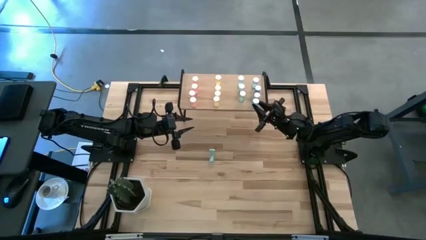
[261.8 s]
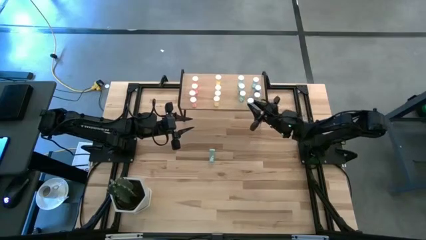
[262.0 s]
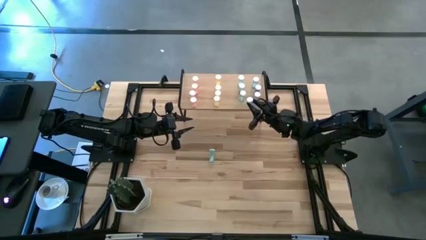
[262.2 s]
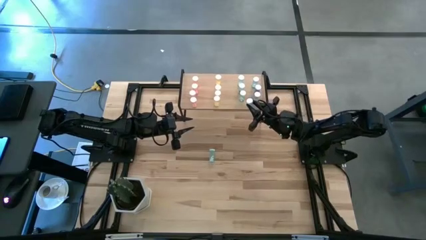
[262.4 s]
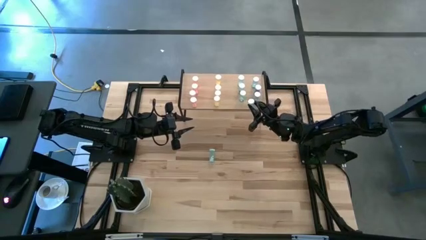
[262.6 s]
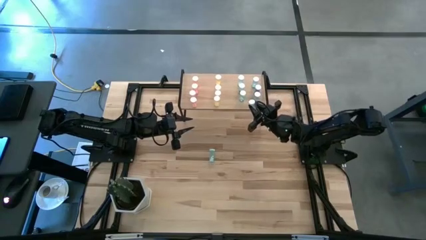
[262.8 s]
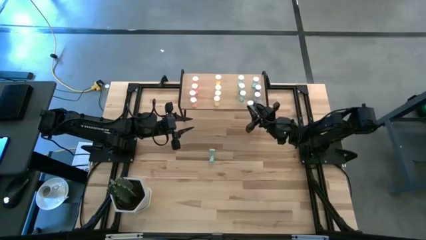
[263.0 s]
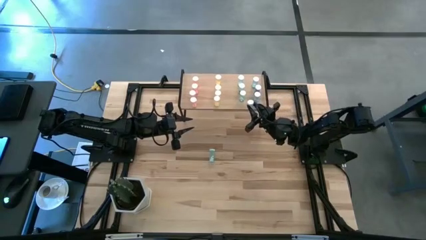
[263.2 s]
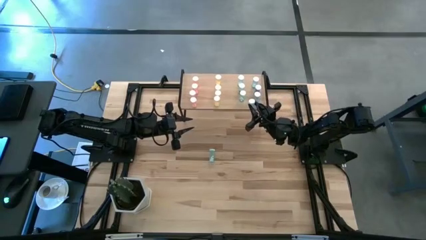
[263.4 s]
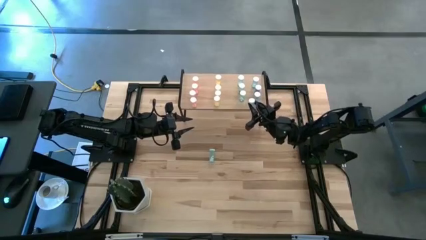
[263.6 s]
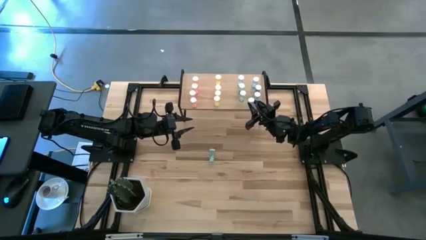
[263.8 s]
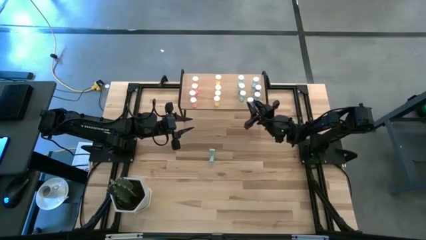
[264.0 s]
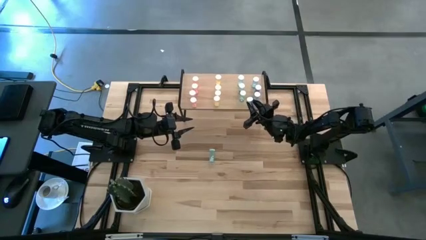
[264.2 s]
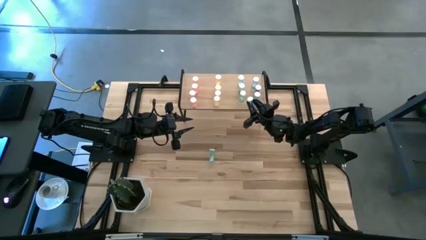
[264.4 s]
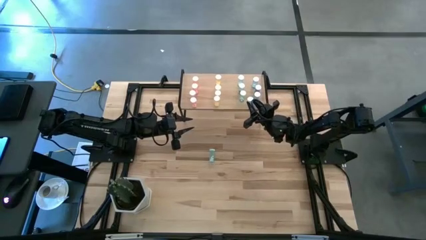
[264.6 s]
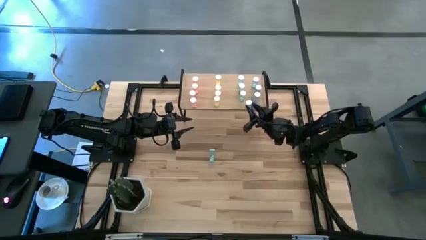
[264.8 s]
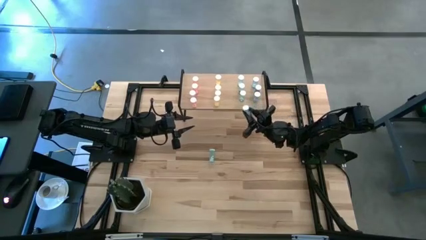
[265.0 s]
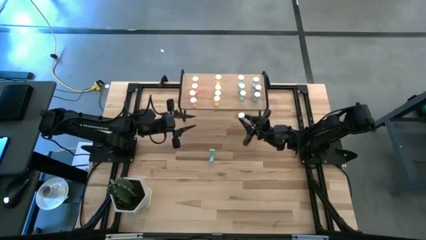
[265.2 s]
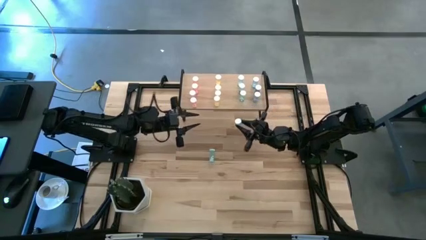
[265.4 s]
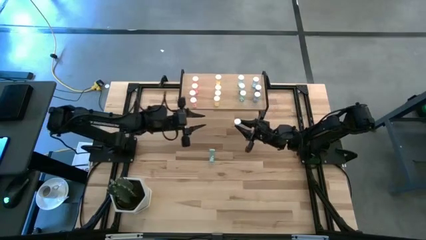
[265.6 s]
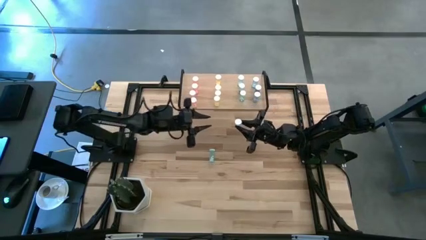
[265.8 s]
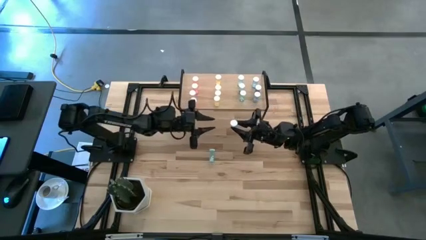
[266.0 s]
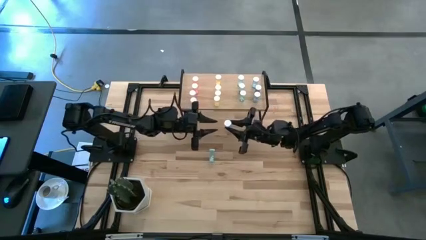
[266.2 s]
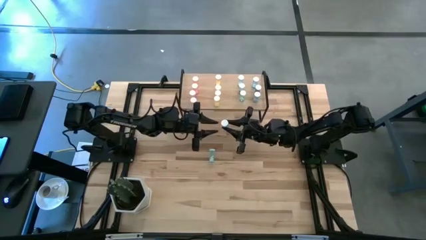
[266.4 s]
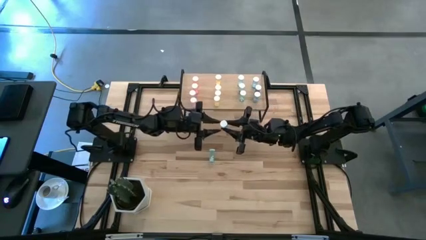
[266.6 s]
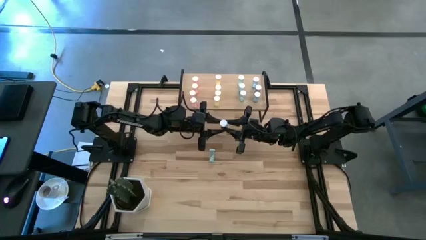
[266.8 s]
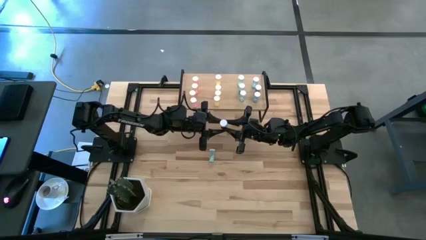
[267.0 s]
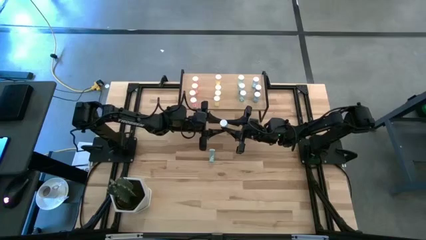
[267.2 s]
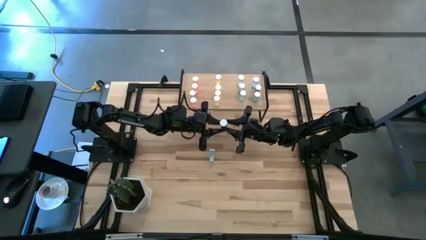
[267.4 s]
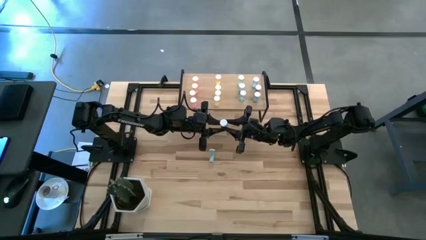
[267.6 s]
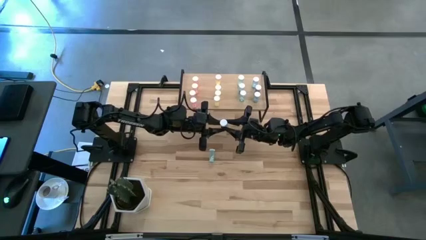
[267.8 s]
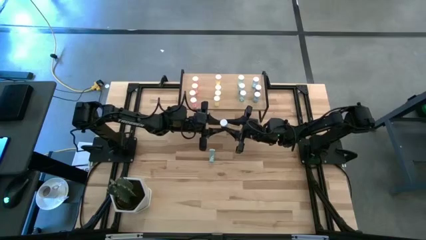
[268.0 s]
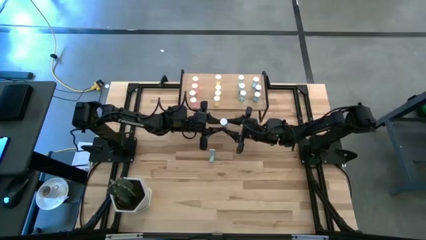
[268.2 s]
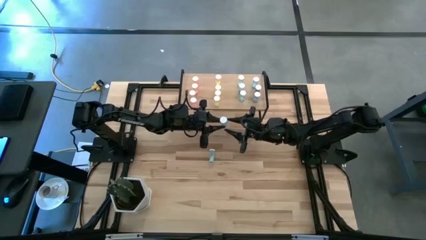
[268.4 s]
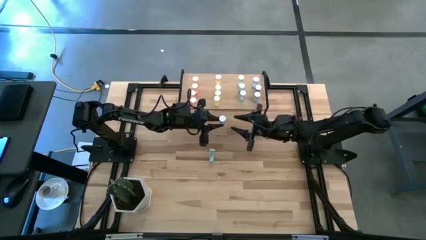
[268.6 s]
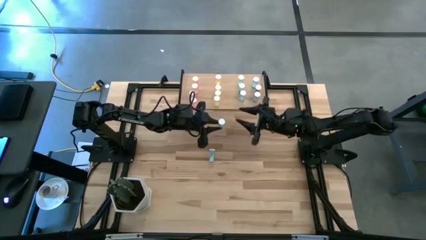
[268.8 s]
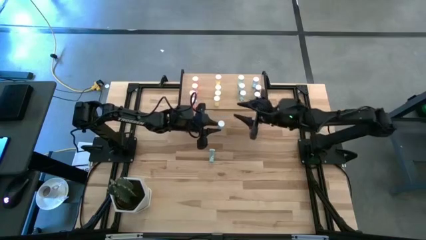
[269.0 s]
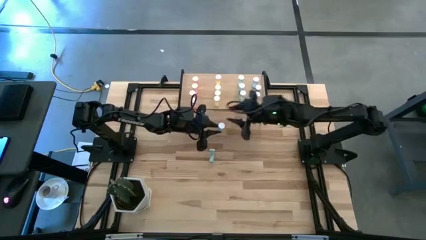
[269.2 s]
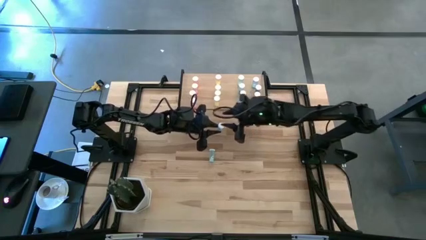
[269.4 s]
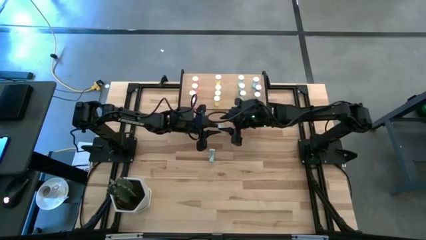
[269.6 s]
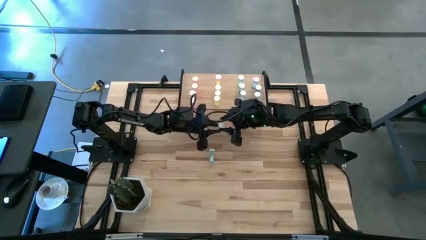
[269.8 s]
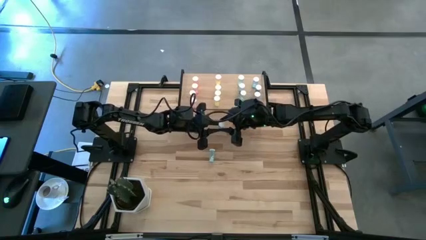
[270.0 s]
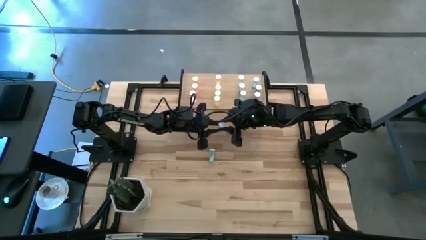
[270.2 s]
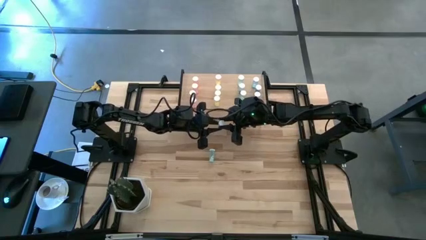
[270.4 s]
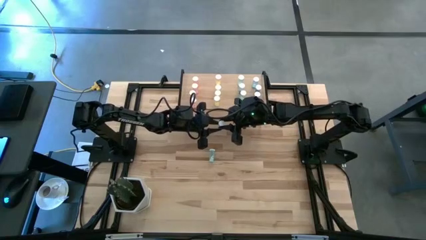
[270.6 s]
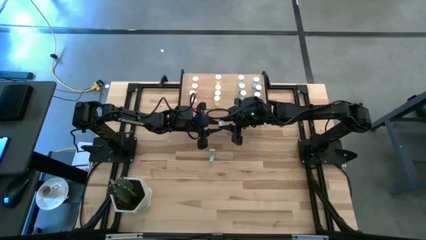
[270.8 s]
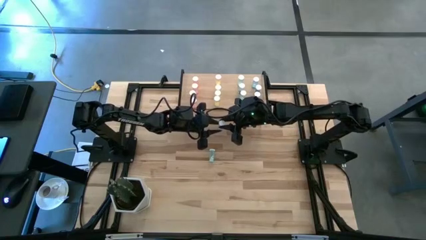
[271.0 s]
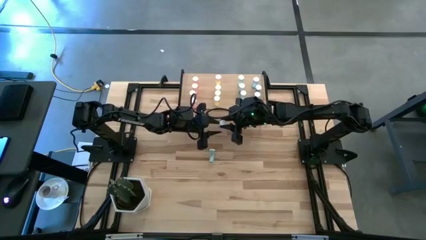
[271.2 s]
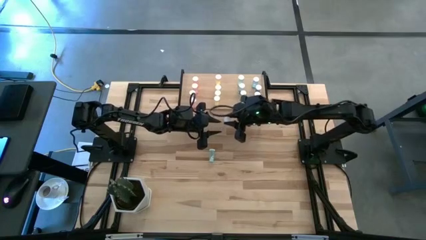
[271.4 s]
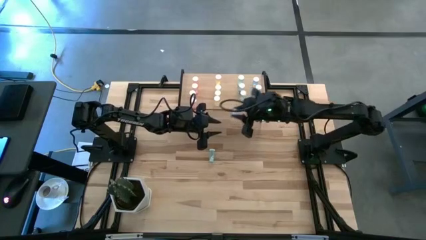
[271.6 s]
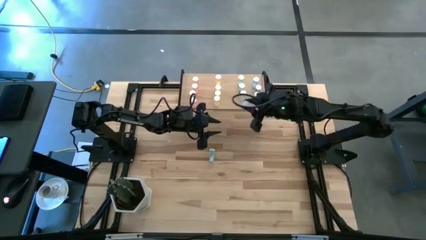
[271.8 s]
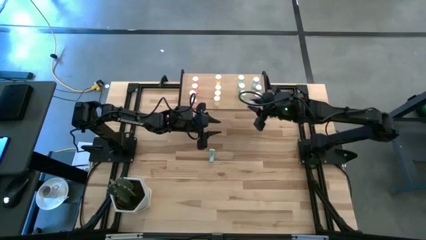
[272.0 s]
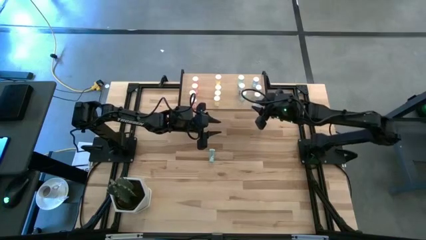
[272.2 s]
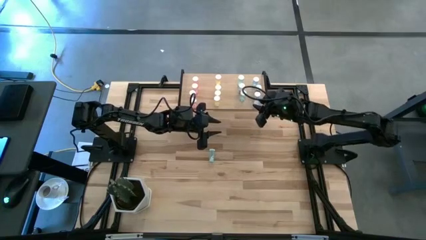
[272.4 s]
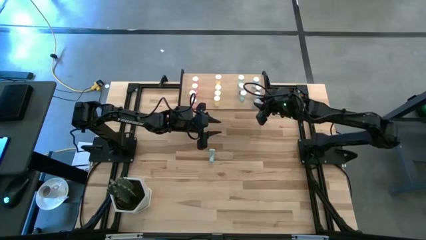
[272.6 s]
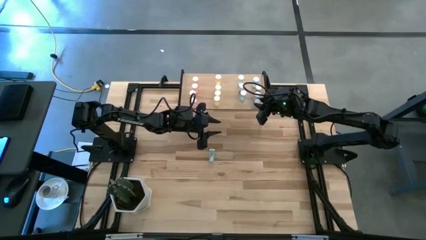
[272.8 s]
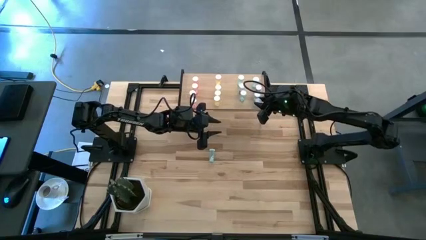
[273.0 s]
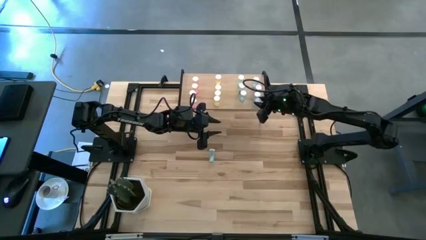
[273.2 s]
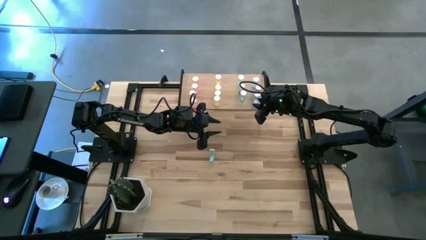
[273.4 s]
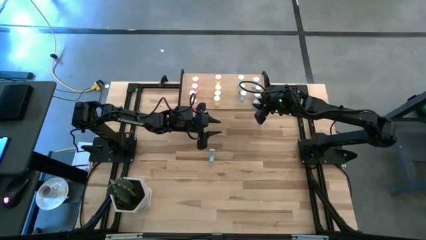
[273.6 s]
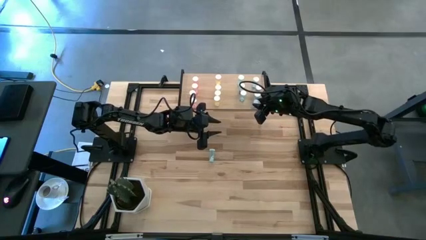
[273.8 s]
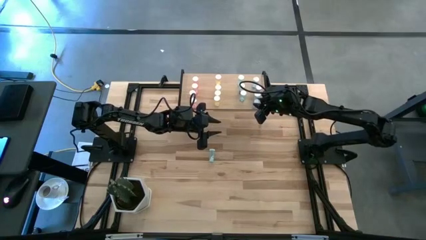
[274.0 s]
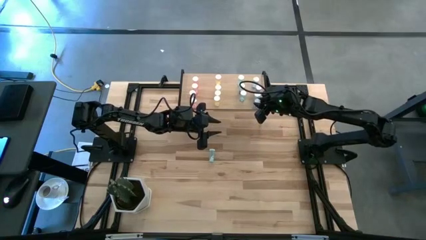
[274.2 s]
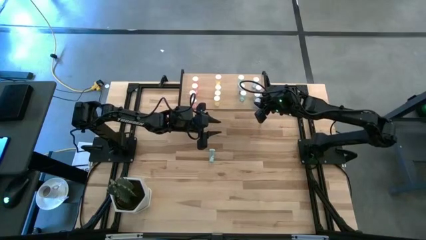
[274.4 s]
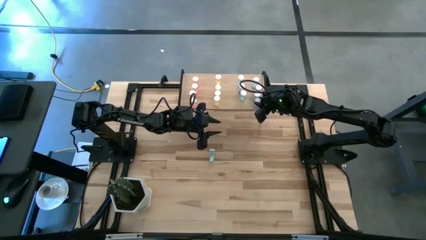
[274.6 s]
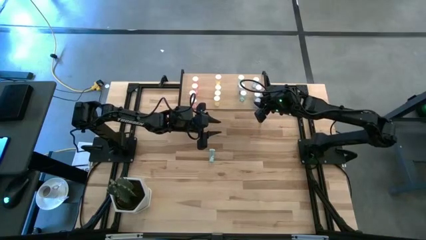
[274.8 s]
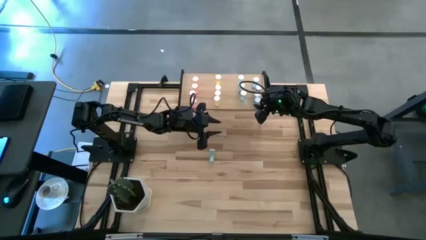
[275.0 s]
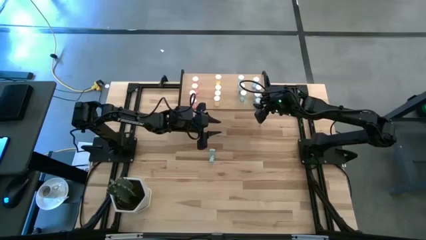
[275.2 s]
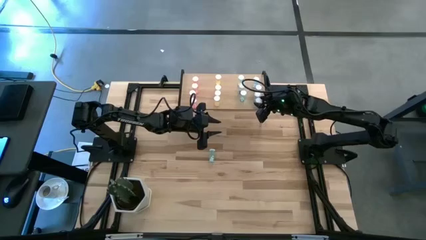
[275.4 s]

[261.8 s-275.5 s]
Task: Pick and place medicine bottles onto shelf by color
Put the blue pill bottle on the shelf aligned with the other blue pill bottles
